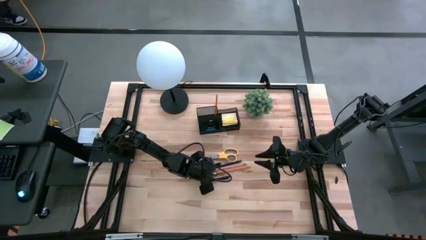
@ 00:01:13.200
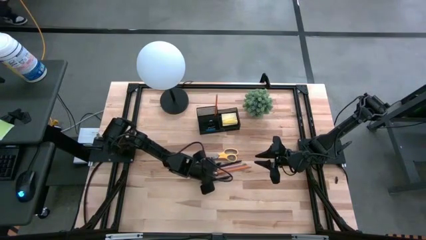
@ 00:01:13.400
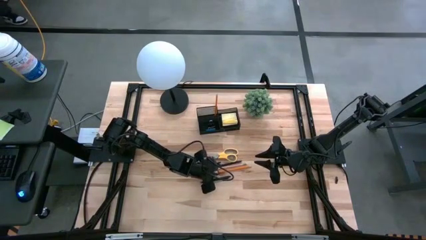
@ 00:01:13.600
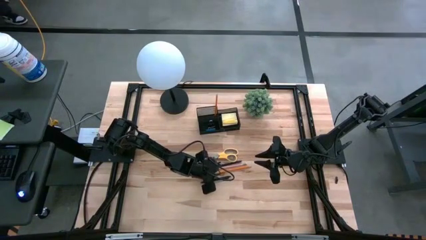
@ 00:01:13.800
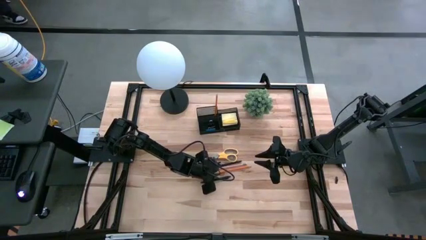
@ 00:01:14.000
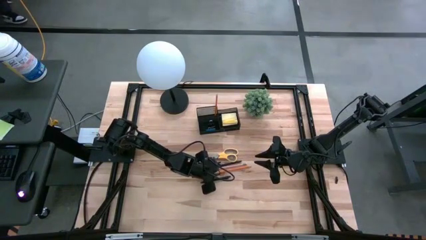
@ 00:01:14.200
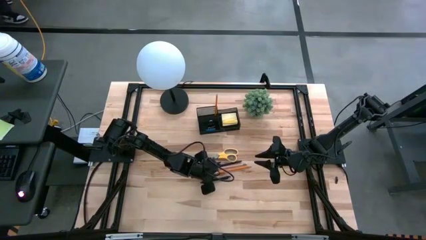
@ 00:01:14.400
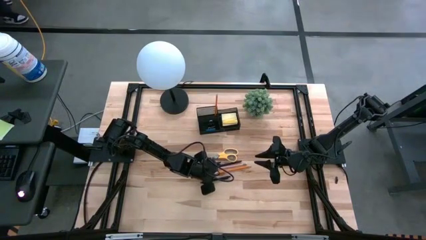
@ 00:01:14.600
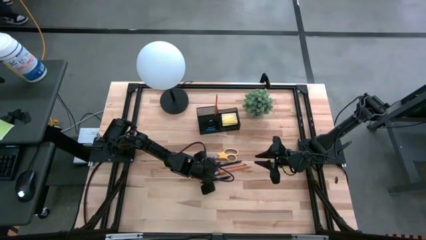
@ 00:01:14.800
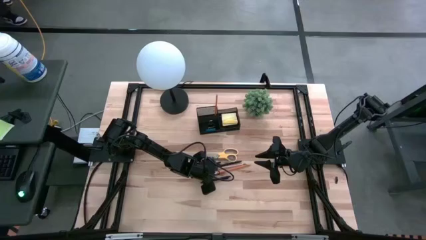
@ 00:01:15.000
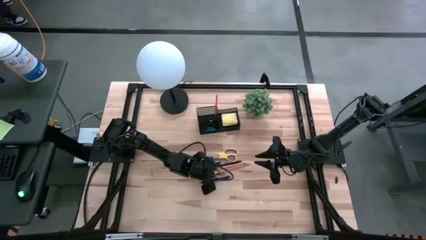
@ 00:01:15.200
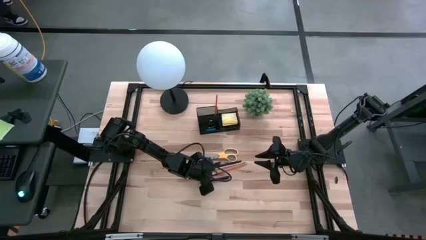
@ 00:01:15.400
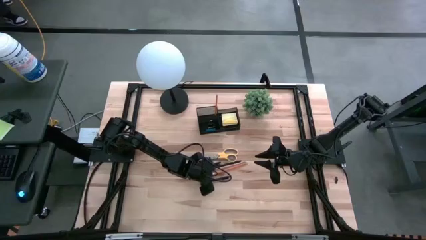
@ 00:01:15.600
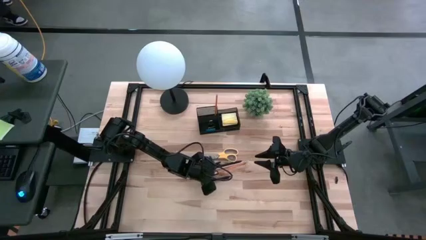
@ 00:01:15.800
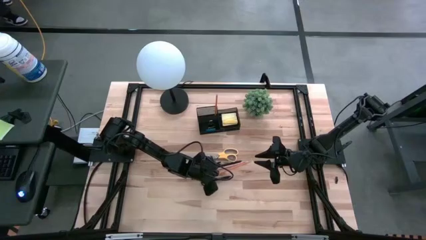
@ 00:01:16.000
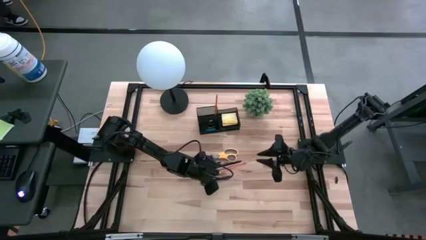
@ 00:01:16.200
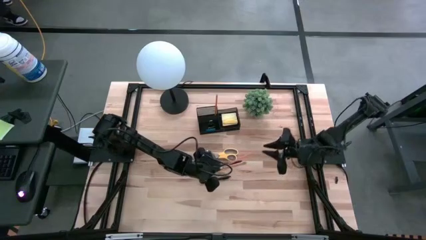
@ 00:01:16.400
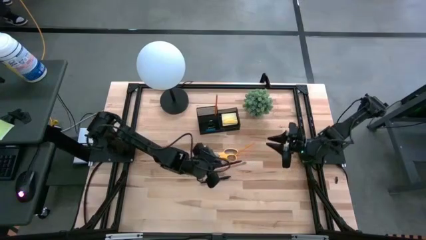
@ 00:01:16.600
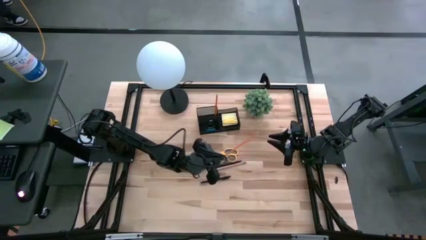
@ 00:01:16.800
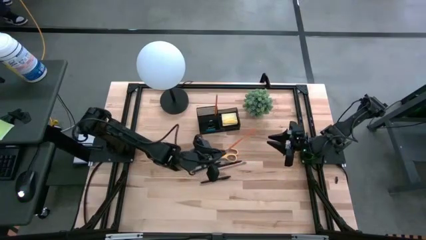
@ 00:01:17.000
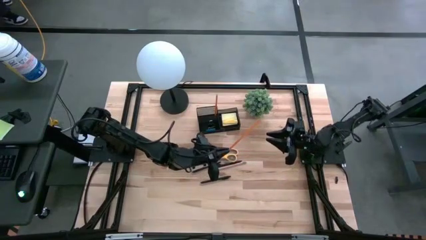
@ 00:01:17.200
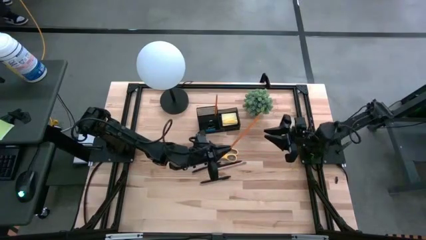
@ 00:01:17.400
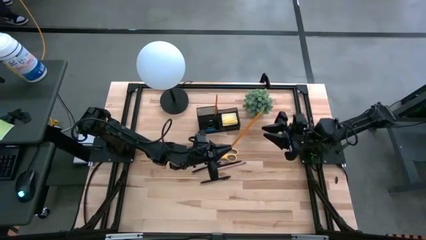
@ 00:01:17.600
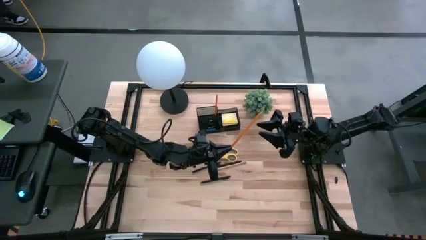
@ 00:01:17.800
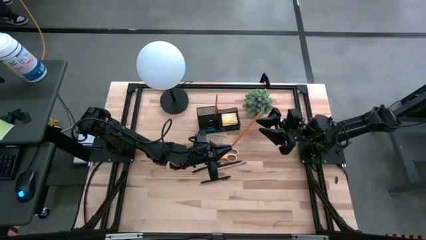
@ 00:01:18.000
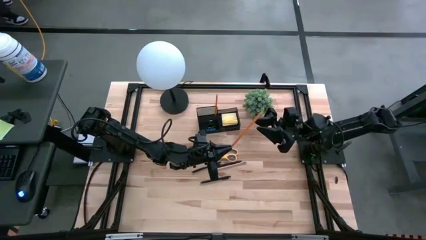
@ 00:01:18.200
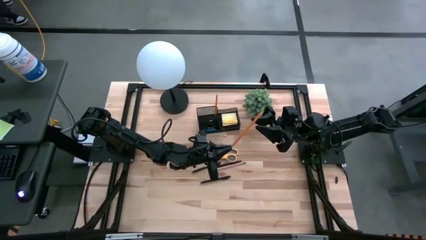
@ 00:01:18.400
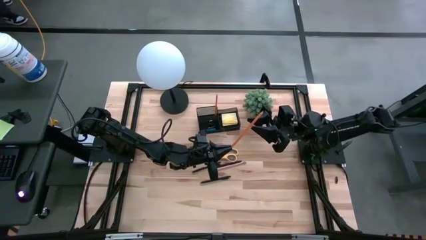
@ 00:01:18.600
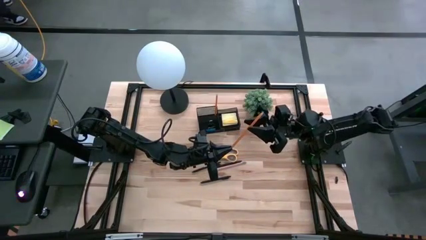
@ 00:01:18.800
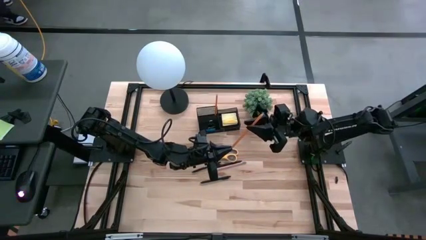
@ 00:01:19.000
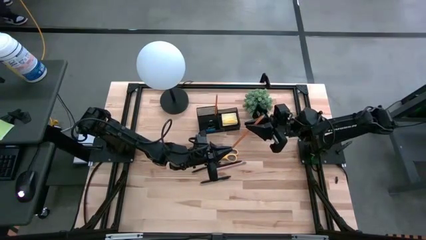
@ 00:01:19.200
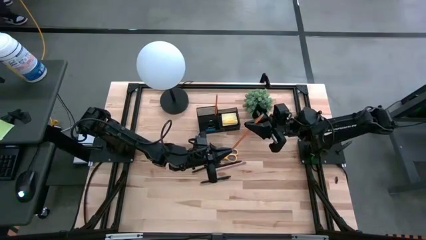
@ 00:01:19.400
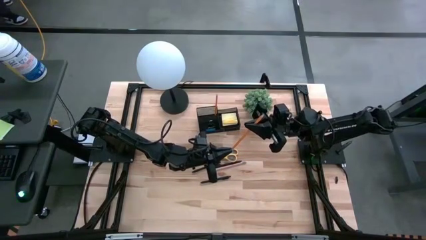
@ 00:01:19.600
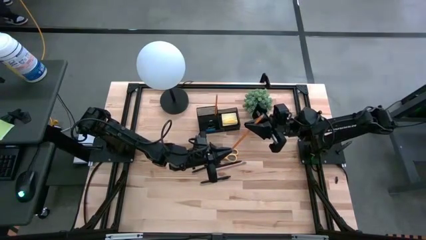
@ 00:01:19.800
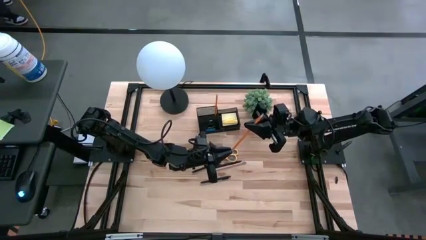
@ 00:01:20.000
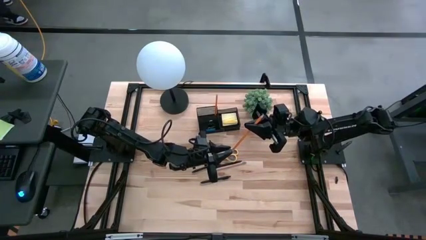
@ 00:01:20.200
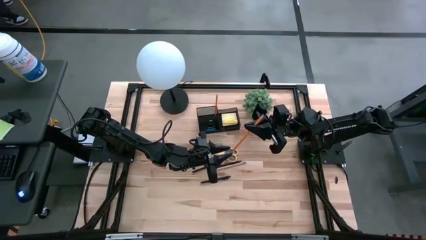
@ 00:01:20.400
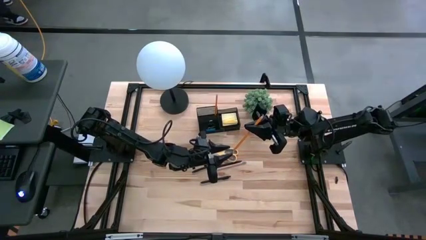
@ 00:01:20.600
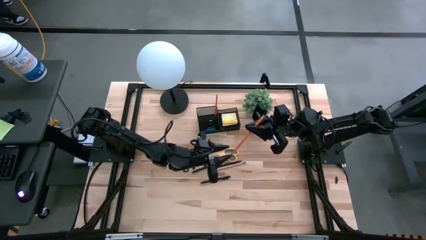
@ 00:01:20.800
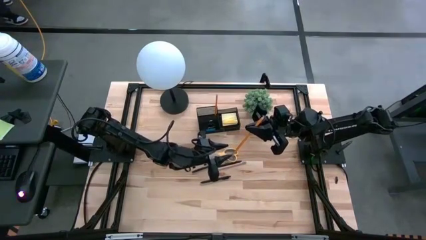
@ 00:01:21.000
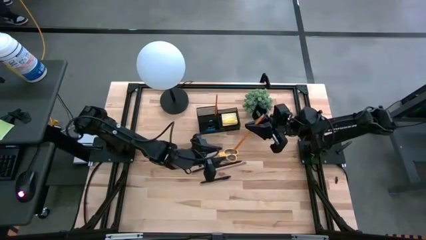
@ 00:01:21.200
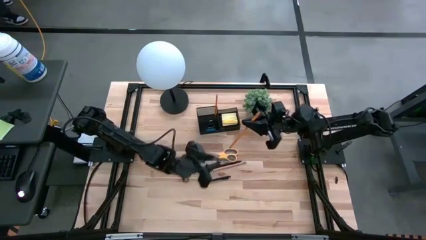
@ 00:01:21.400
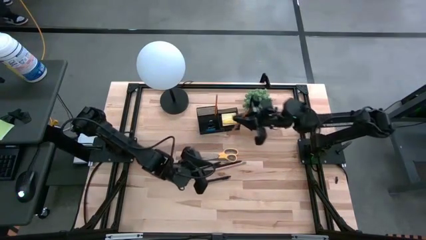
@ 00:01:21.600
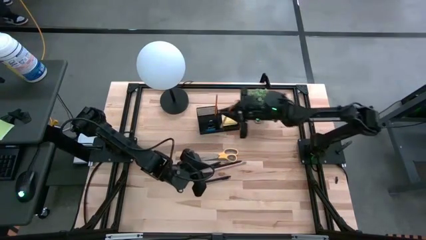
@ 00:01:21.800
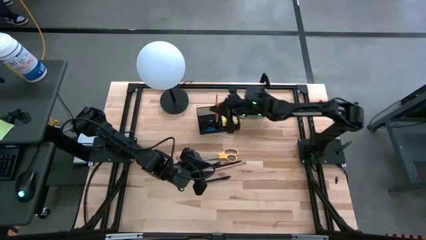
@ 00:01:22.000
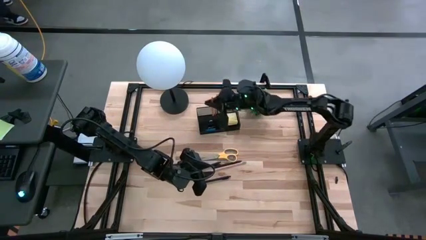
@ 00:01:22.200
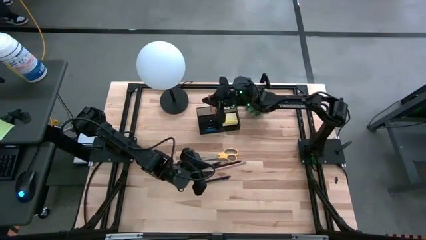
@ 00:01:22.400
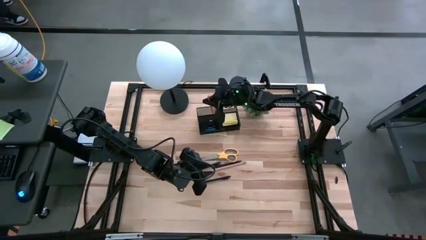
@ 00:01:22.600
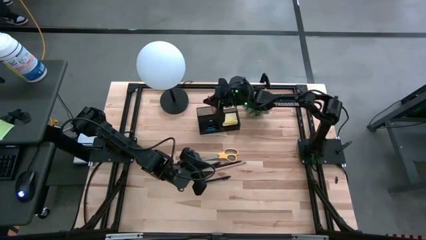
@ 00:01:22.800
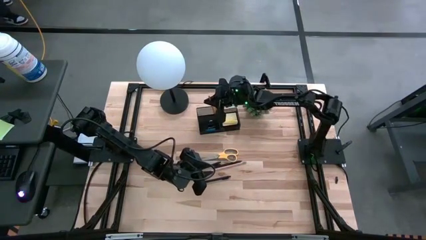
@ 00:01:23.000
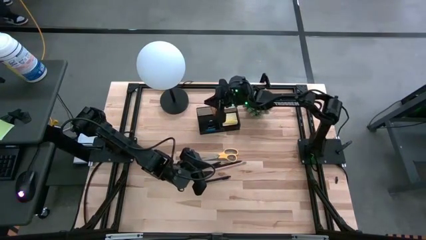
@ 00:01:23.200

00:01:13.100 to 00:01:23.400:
Task: Pick and place office supplies into organizer
Put the orange pencil into the desk organizer

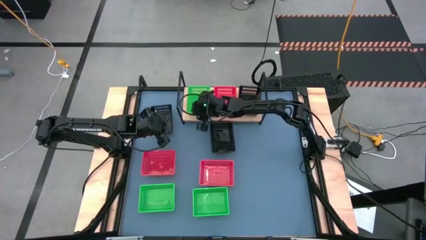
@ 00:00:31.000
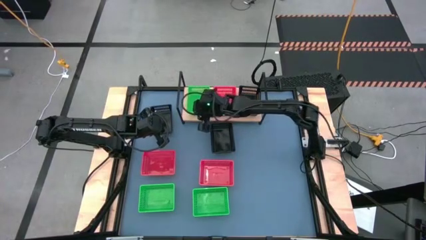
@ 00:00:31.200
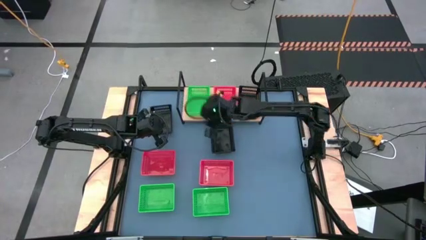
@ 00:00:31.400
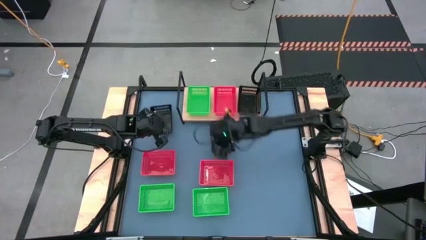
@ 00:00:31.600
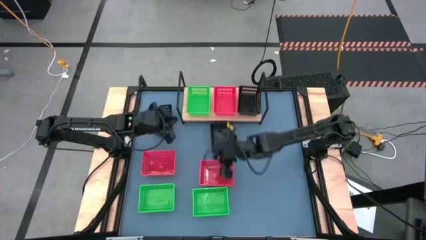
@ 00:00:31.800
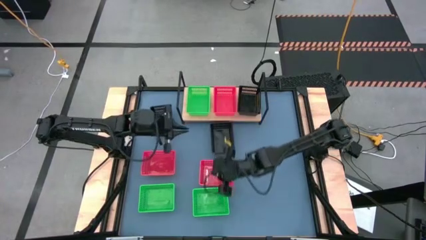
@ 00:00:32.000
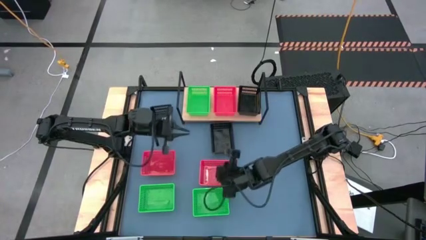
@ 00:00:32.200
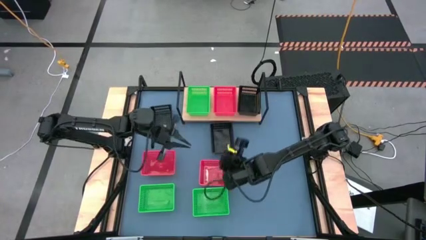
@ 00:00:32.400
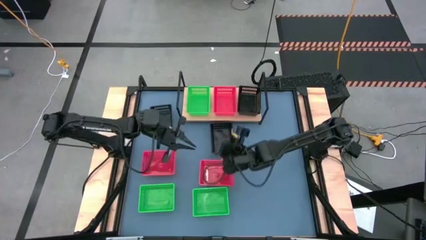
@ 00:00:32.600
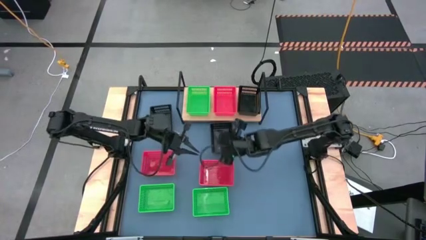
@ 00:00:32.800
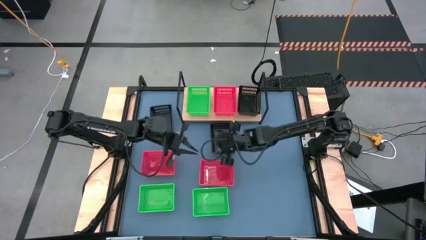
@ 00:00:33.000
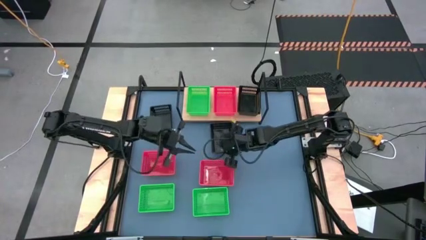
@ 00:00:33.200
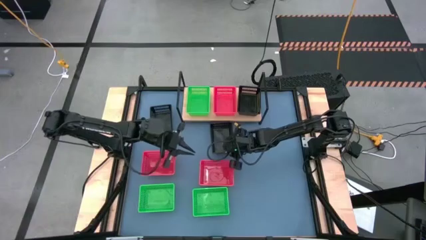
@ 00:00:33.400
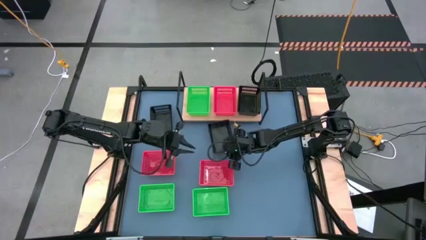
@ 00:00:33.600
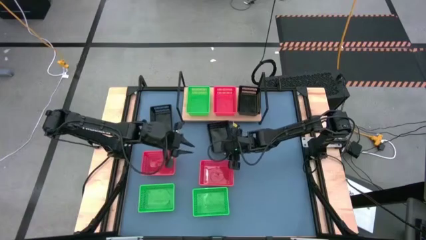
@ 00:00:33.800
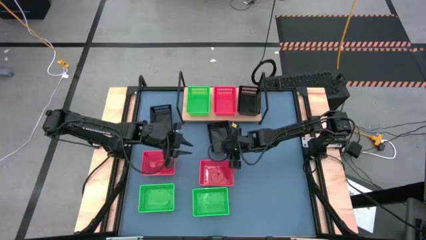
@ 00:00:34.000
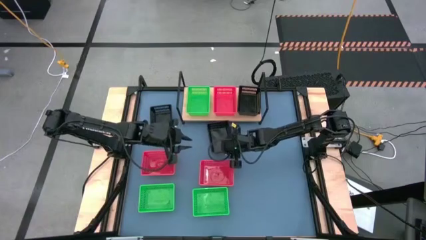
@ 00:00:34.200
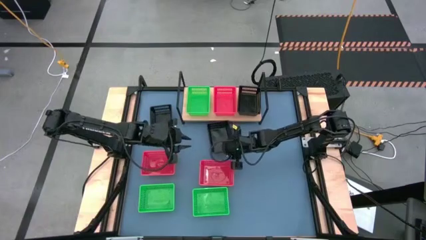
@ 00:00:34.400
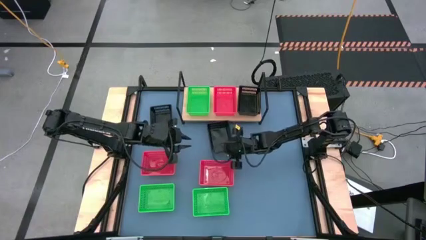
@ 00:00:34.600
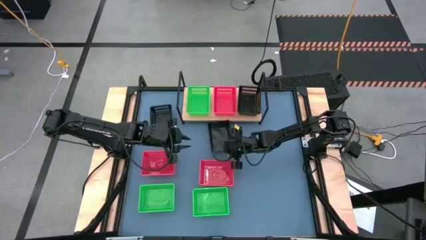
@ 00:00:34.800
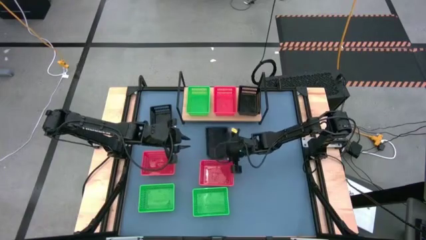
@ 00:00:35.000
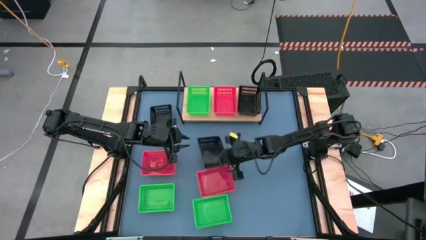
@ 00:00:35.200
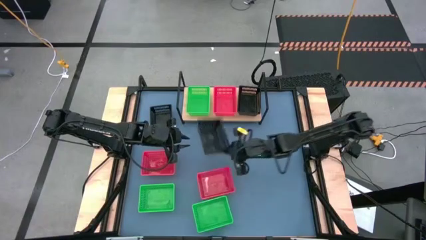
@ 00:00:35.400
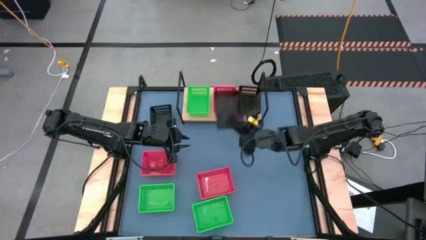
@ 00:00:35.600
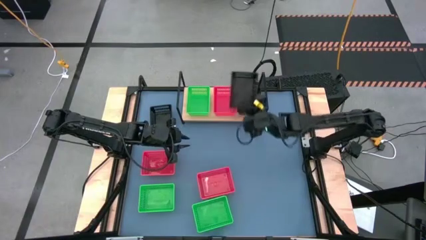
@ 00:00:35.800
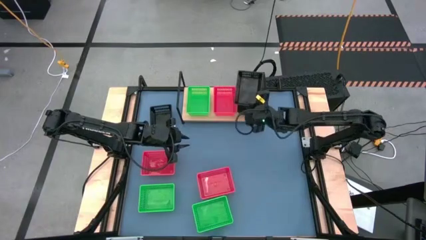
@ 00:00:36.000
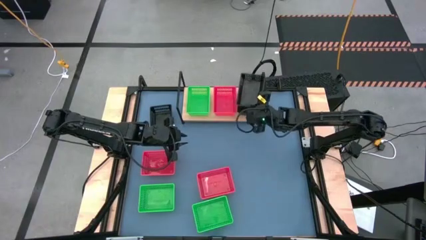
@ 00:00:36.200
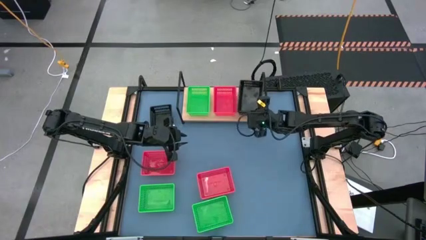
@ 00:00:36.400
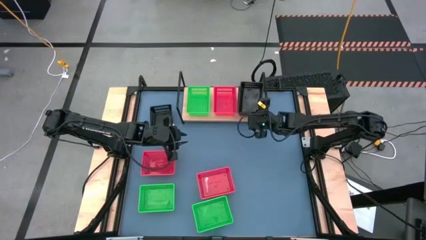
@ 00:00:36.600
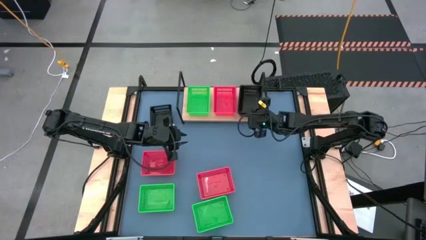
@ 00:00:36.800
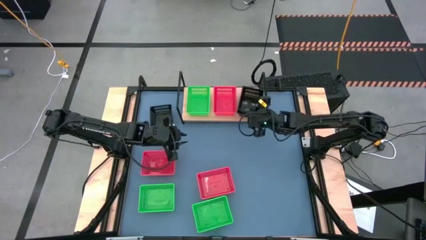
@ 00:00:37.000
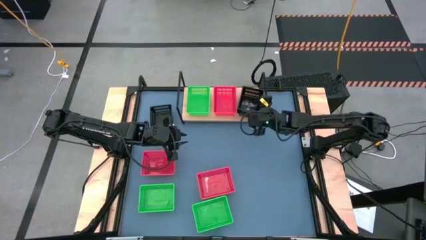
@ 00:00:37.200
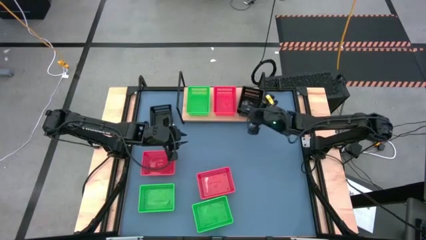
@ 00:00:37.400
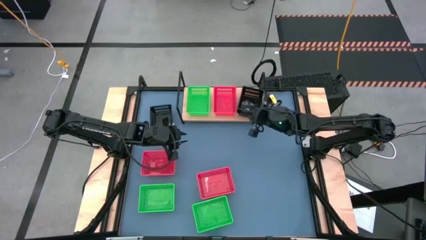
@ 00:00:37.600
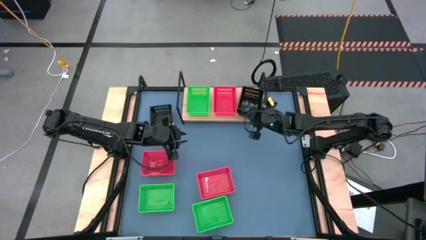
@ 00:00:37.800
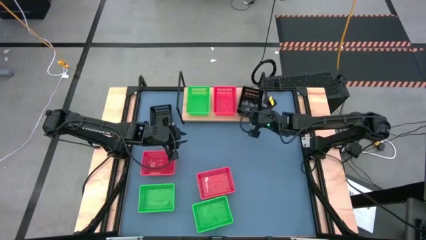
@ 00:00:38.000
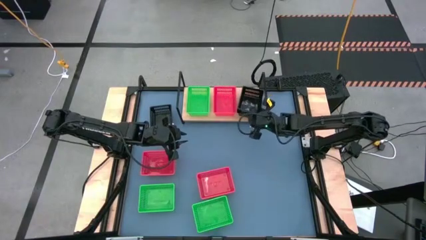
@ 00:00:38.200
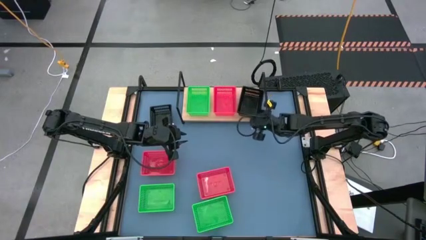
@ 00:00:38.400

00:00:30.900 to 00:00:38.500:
Task: Stack baskets on shelf by color
Stack the bottom black bin on the black bin on the shelf
